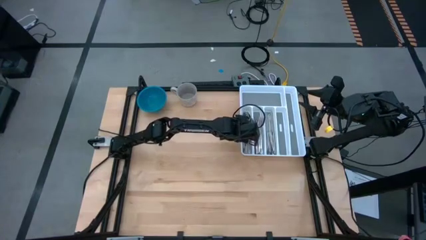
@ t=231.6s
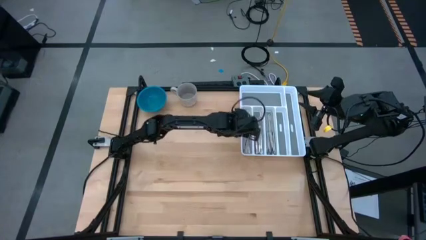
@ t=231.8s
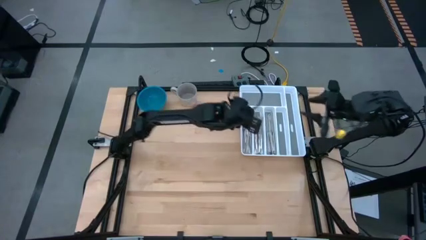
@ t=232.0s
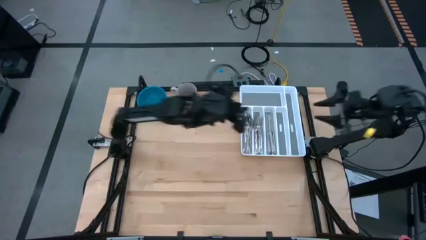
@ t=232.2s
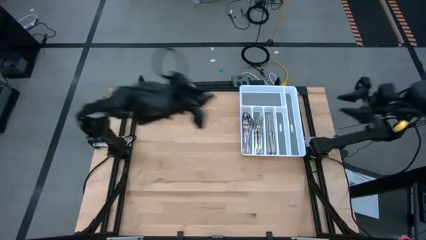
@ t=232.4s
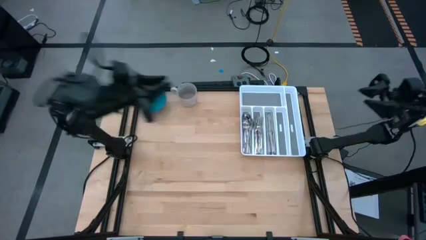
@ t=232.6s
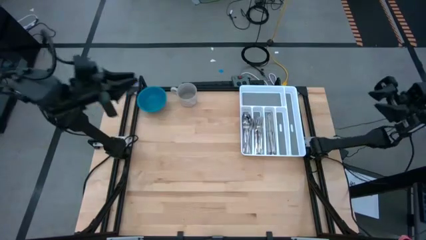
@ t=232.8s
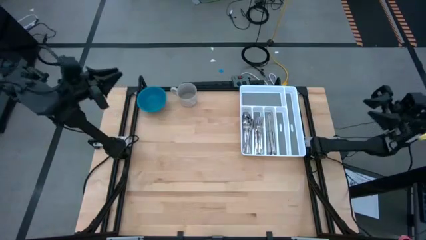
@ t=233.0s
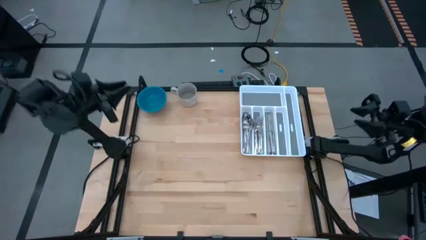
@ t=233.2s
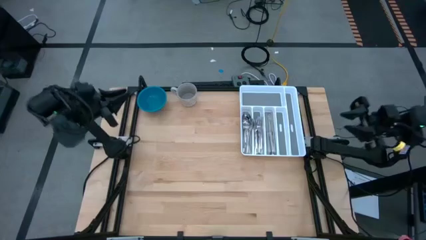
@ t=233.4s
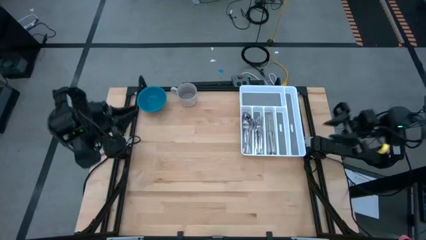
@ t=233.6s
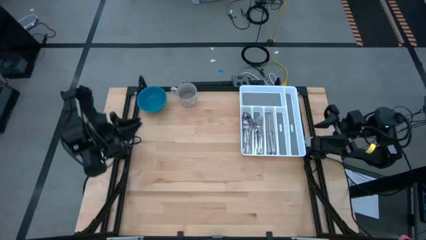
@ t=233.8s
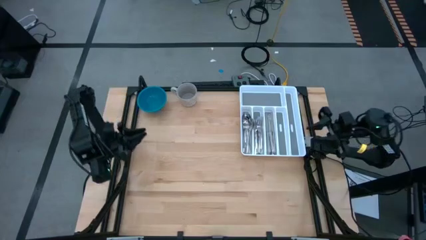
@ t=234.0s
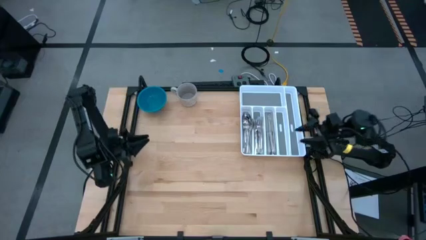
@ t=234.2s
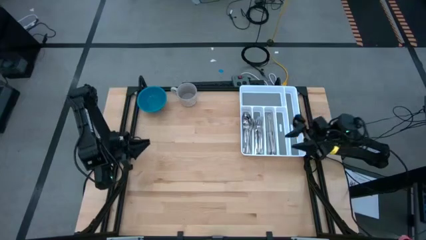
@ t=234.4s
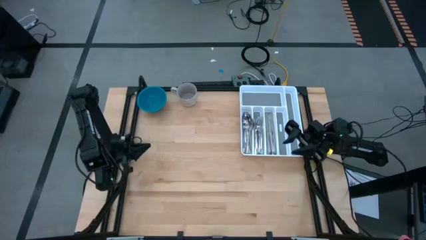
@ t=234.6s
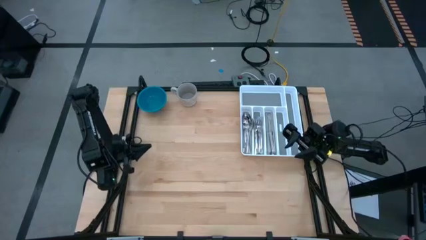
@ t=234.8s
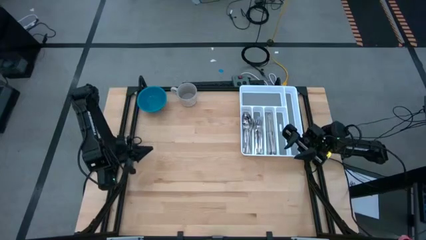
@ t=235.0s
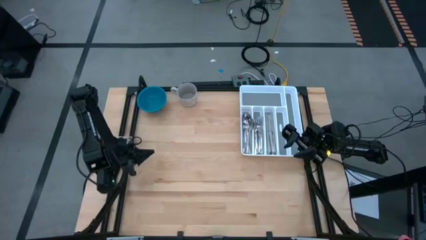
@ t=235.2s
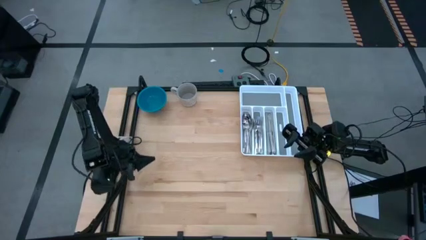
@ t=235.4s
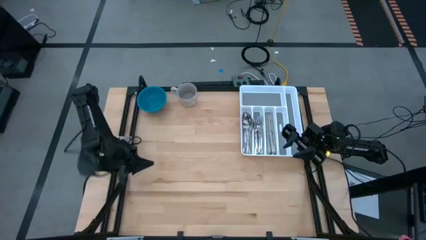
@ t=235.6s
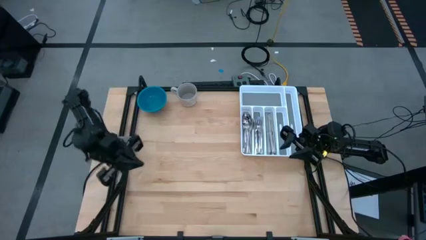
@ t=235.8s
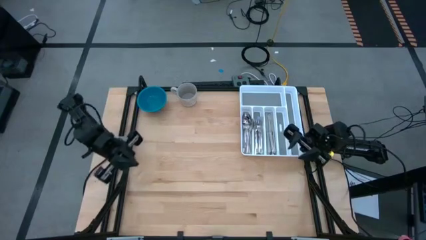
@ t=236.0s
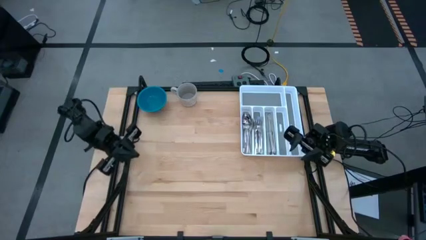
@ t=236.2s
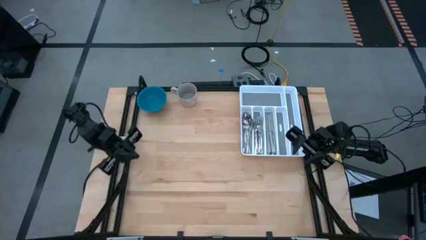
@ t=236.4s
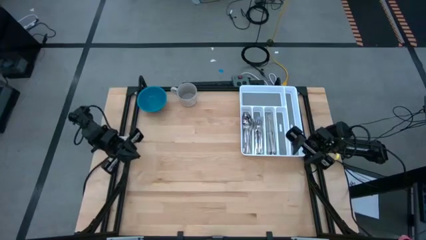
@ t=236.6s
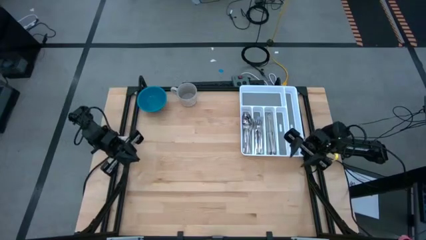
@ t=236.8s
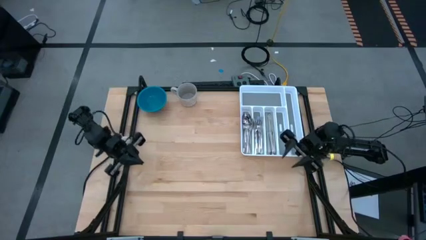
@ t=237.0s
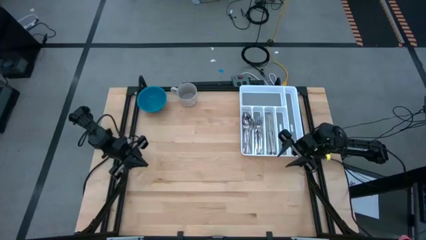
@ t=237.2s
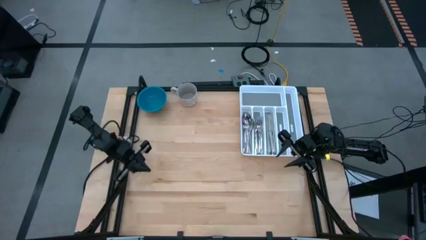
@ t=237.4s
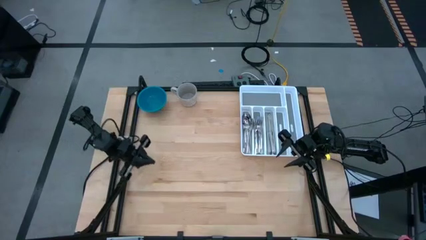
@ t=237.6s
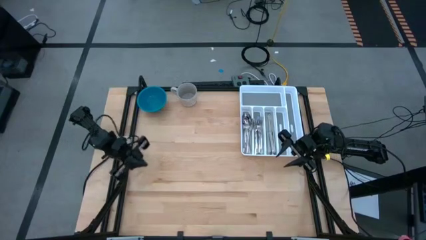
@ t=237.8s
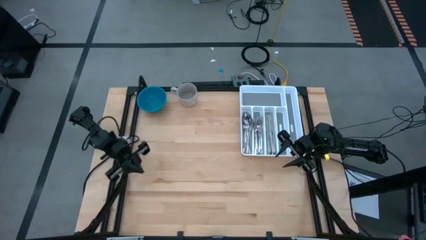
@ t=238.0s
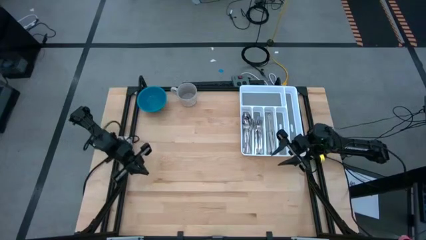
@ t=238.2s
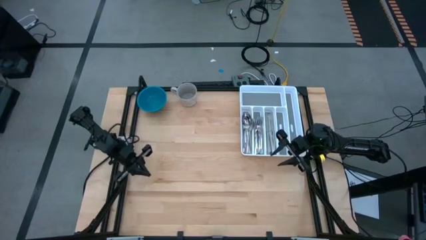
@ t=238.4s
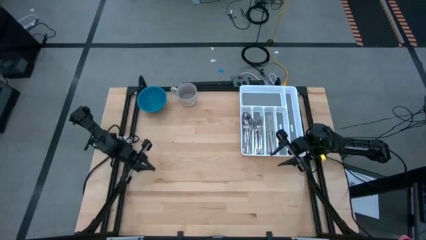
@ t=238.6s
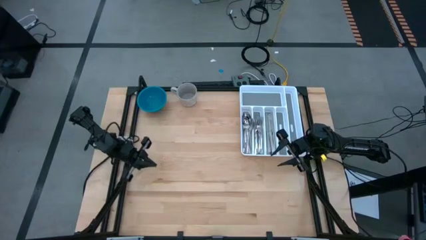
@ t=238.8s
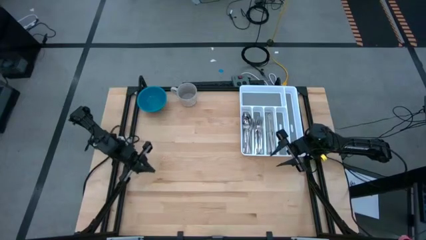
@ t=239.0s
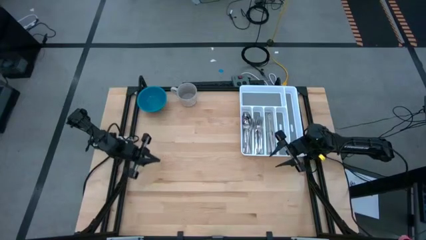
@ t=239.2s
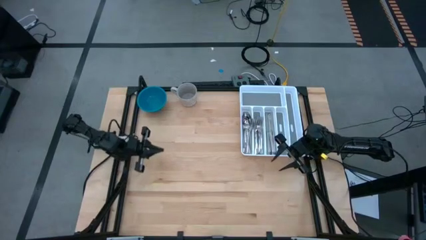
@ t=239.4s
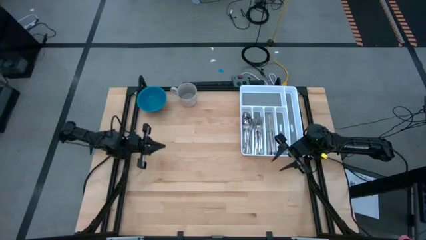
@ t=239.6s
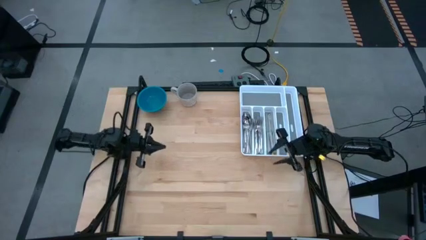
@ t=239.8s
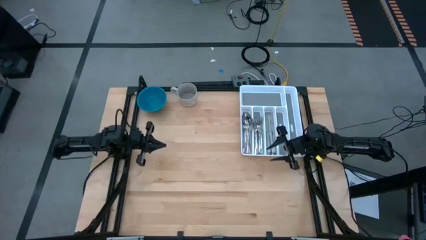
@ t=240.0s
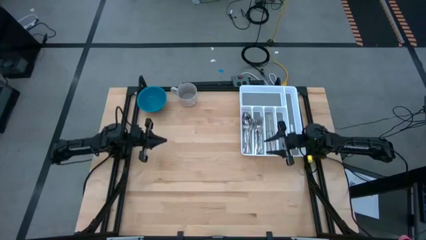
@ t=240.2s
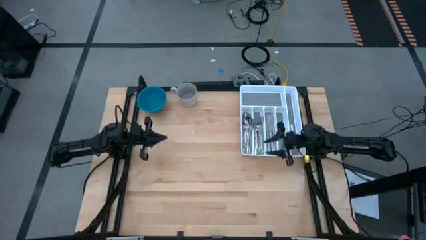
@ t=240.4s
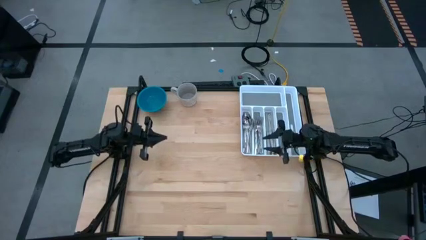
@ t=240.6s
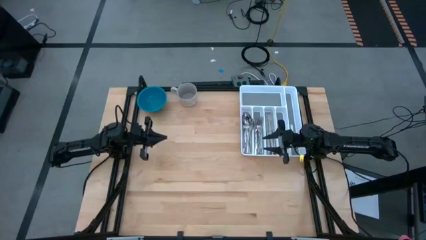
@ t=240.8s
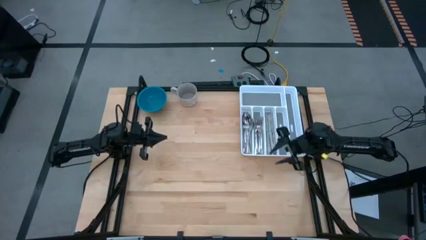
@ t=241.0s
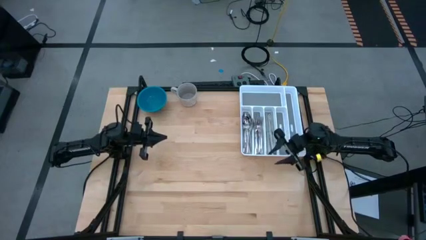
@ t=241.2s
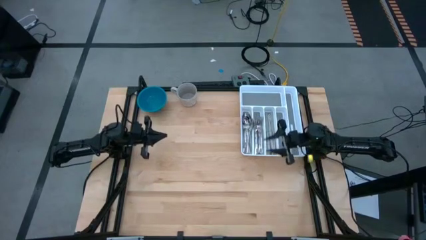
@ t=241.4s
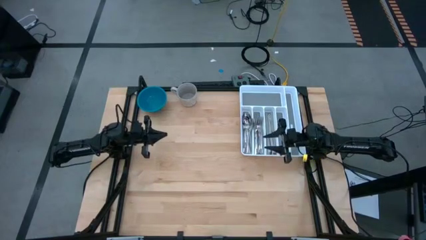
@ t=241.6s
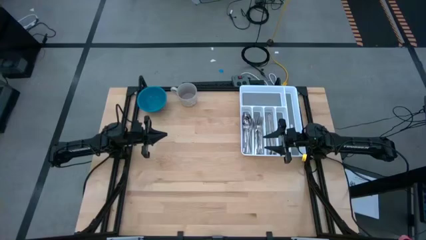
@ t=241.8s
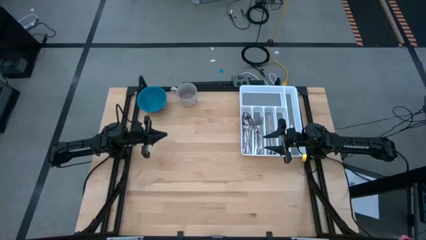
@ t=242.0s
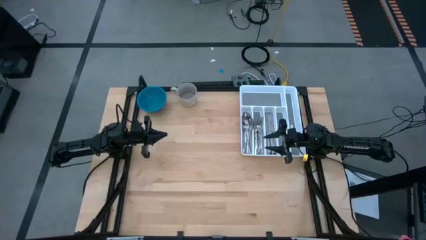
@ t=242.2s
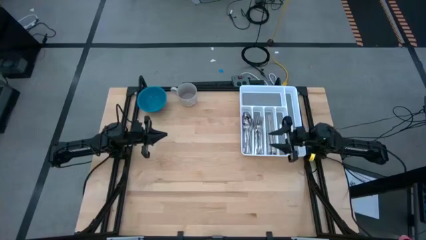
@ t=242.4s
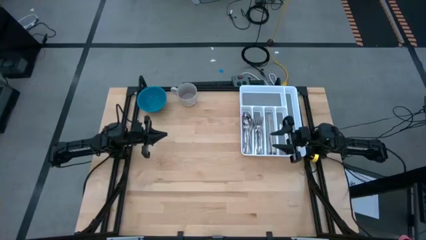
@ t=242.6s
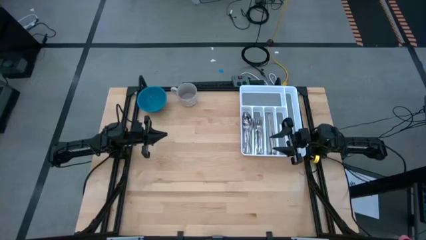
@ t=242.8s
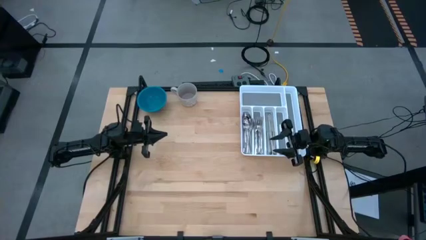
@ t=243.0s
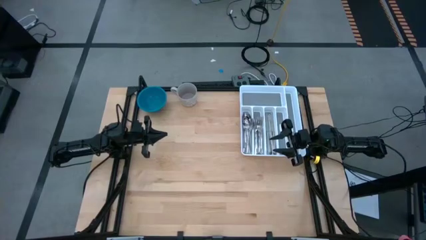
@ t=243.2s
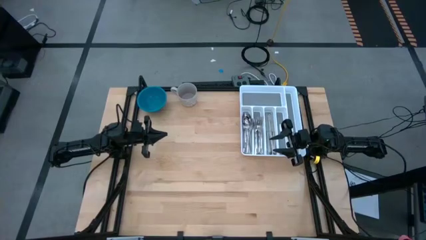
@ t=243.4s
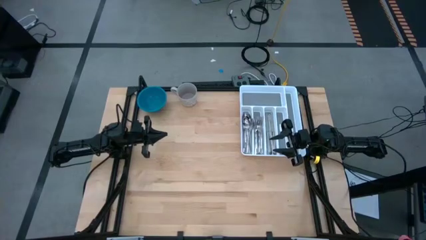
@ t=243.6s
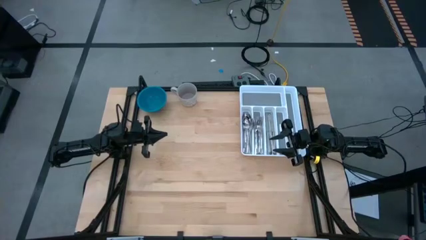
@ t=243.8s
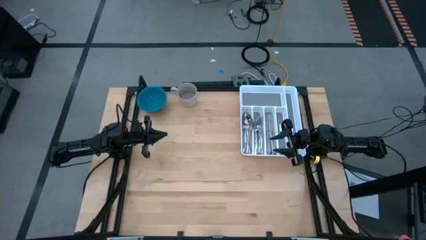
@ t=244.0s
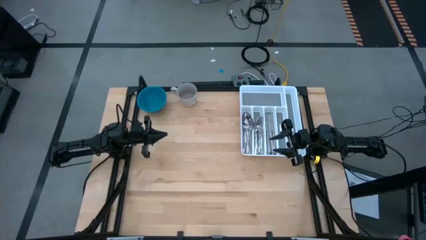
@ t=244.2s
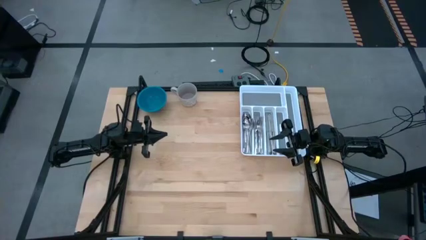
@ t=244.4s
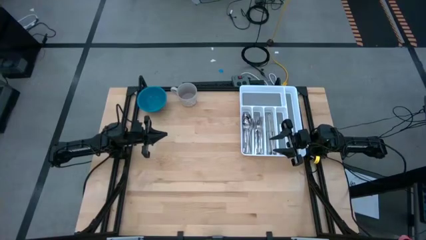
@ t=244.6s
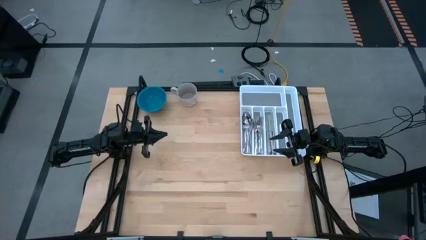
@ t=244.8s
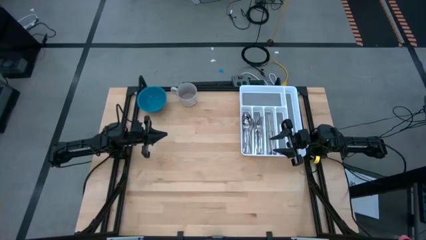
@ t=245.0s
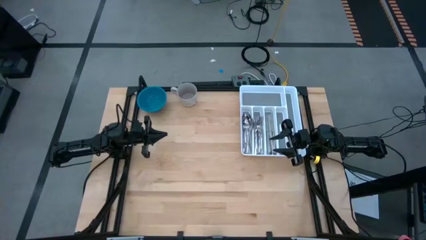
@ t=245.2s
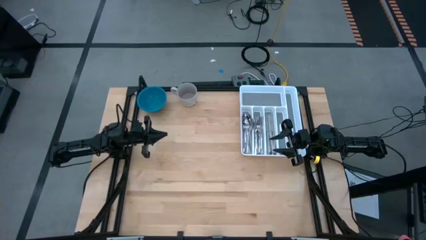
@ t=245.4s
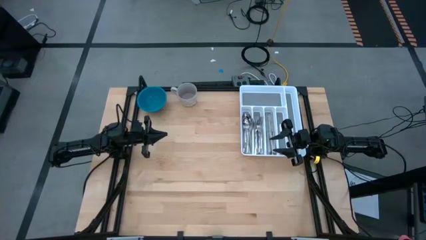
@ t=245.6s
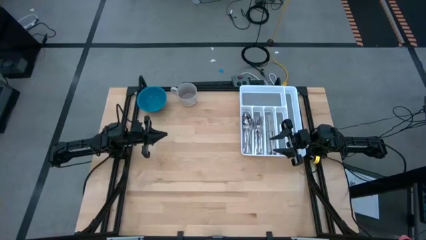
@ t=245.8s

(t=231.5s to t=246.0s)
Task: Sort silverware
Return to Home Position

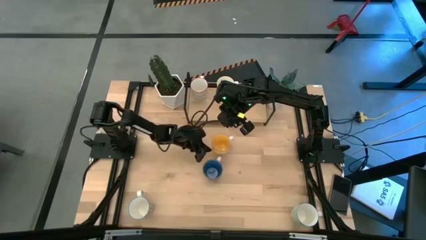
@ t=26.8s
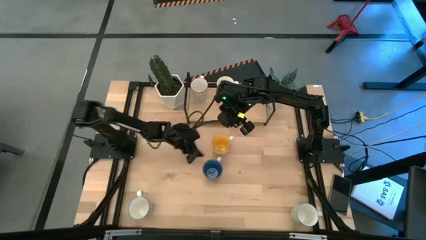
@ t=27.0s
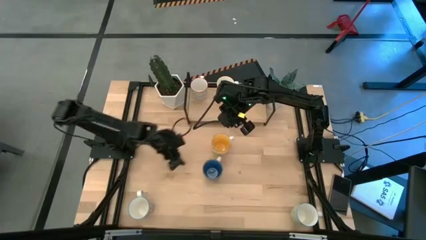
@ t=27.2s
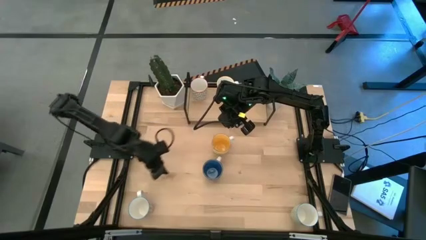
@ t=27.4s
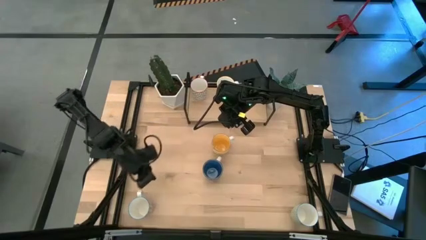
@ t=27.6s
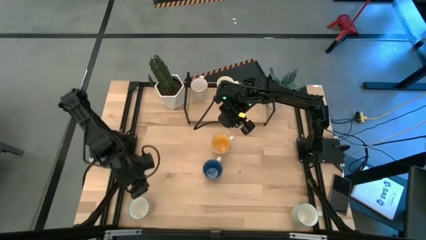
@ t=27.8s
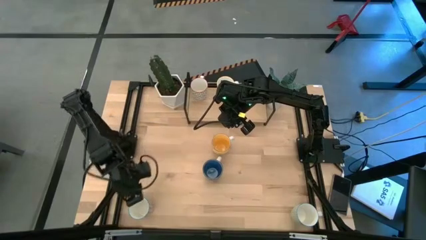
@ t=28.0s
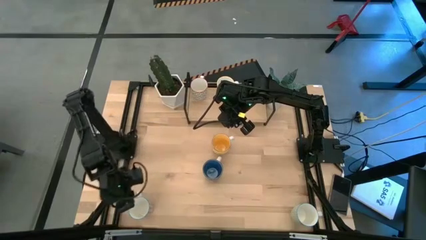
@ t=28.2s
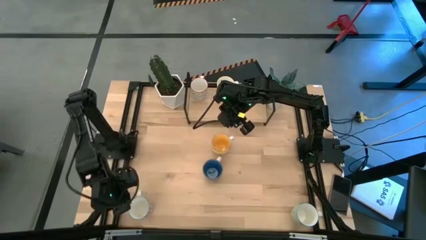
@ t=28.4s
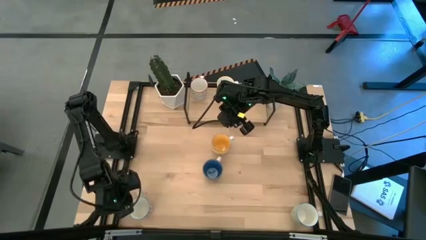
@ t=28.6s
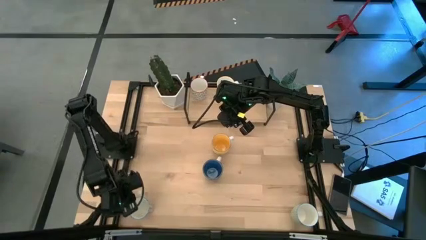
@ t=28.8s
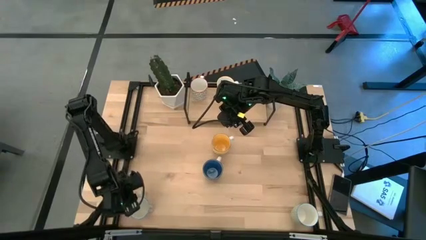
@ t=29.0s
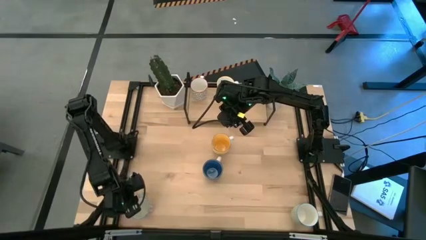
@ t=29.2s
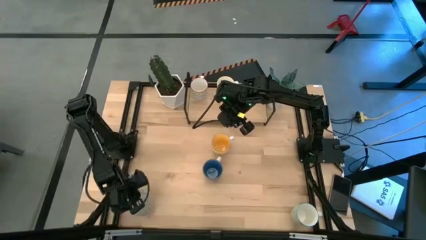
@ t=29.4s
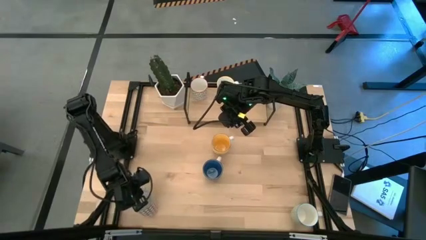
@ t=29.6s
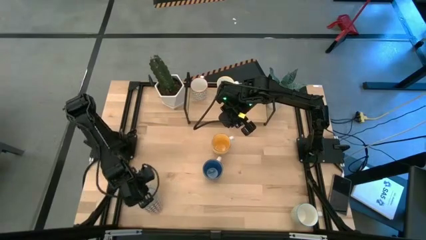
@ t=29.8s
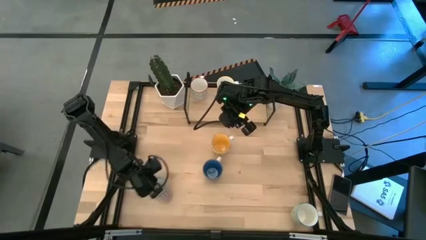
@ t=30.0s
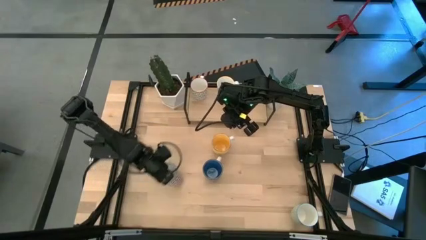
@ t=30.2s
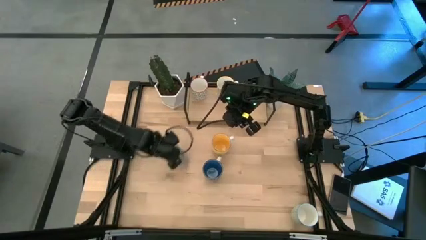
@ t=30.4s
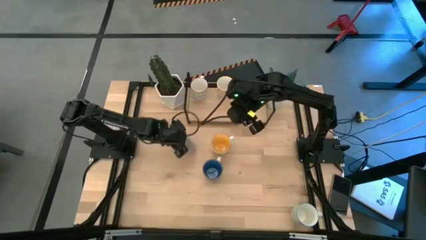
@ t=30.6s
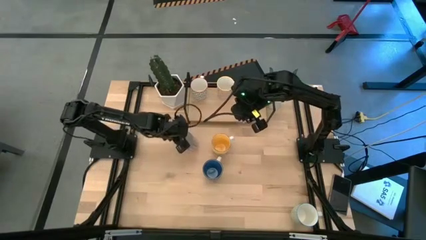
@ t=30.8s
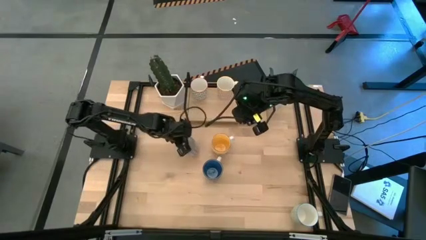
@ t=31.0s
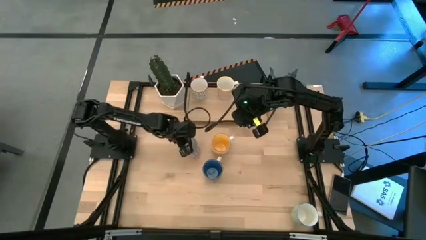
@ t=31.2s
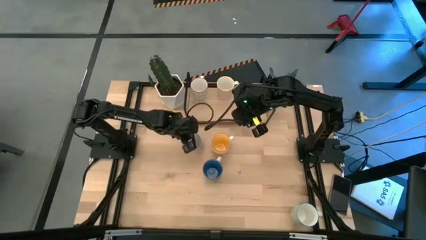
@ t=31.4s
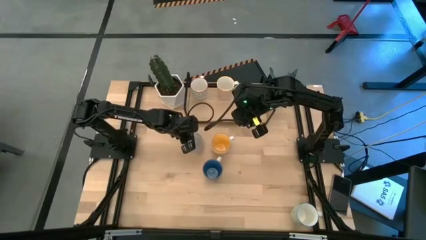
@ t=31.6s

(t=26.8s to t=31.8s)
Task: Place coffee mugs
Move the red patterned mug to the center
